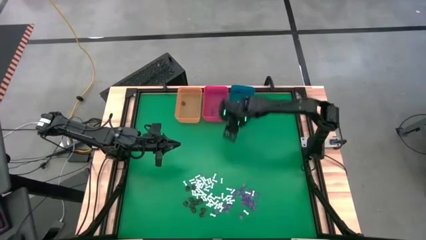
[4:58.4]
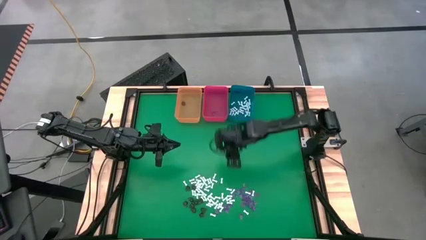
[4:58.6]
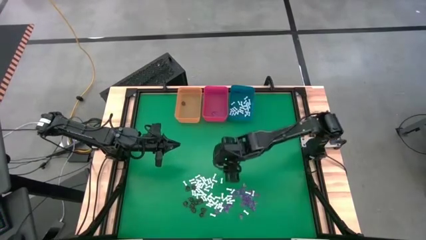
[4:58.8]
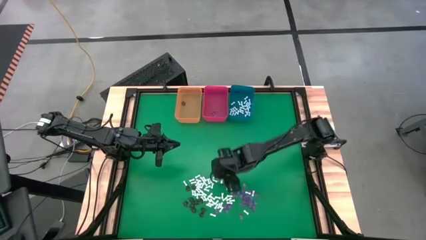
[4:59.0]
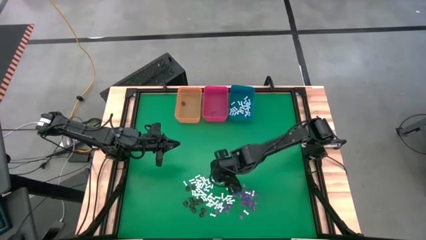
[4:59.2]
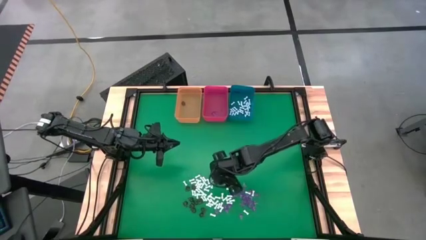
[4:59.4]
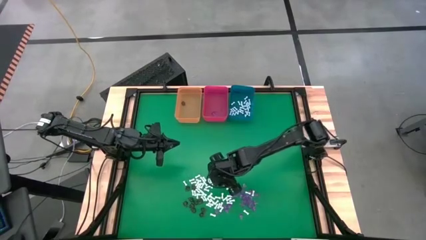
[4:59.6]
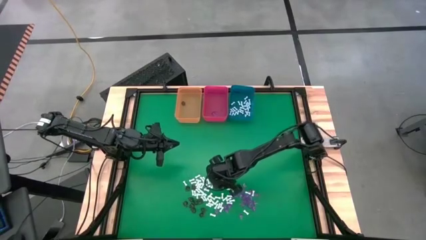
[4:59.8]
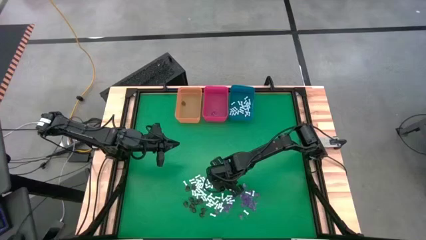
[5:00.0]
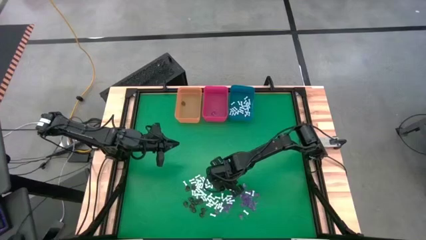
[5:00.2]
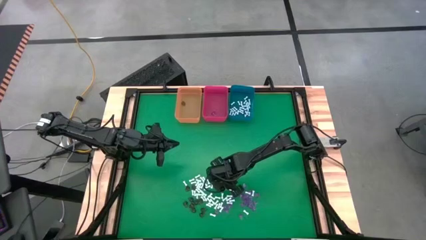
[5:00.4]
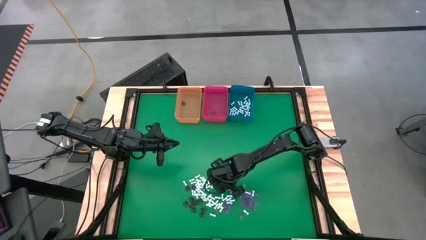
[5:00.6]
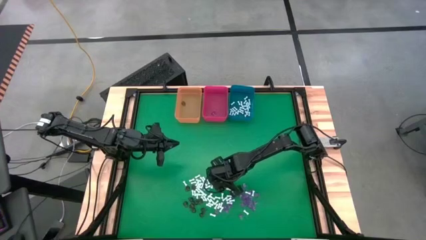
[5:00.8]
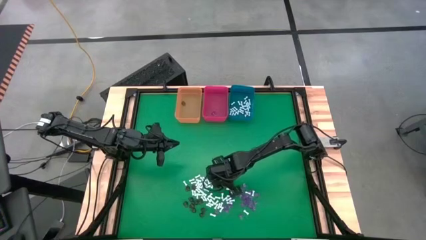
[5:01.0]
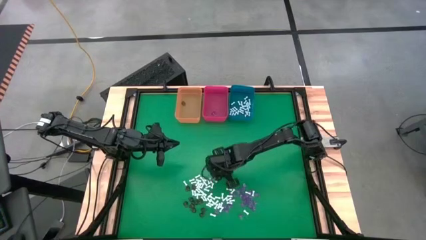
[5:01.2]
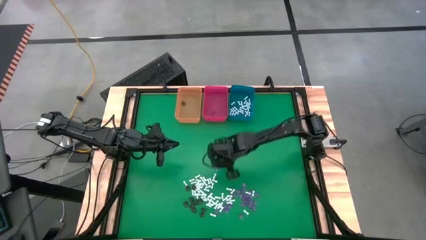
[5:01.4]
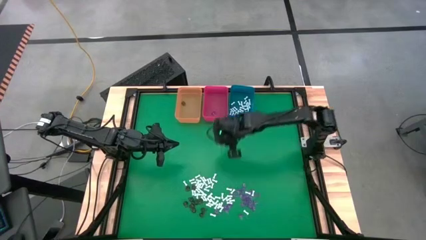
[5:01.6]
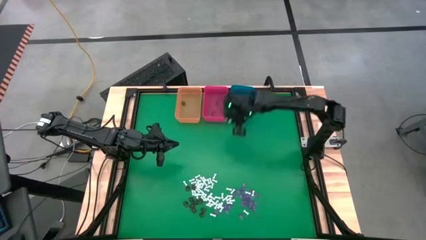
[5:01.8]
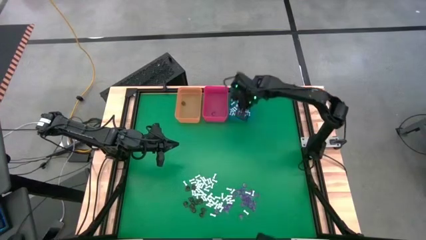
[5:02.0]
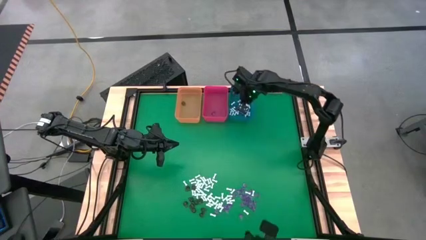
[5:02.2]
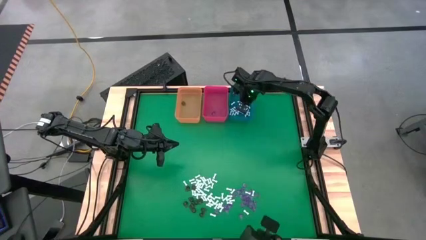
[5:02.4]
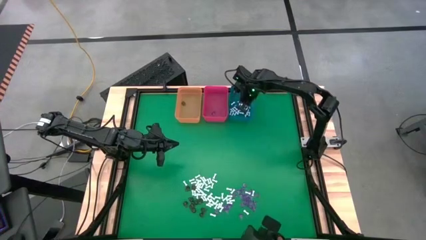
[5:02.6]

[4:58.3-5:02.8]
Task: Sort Halloween decoration
Put the white bone toy into the blue bin

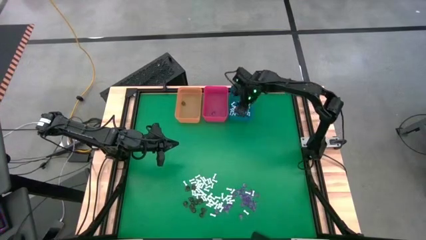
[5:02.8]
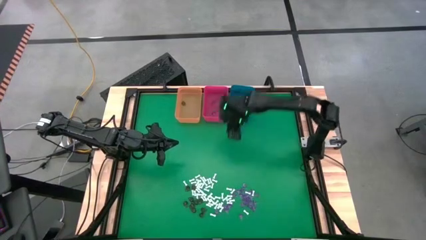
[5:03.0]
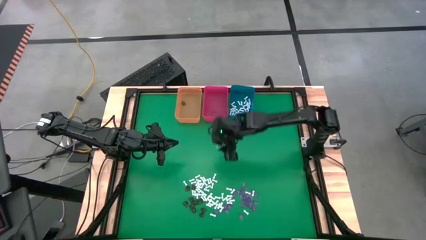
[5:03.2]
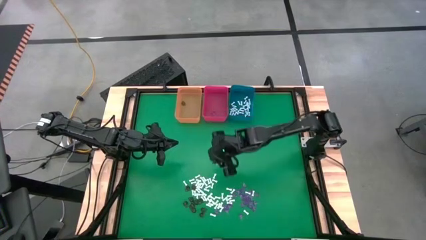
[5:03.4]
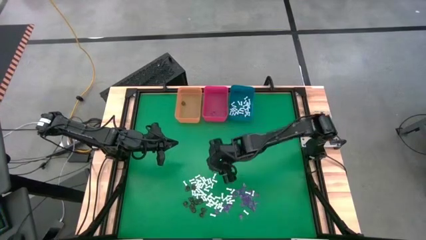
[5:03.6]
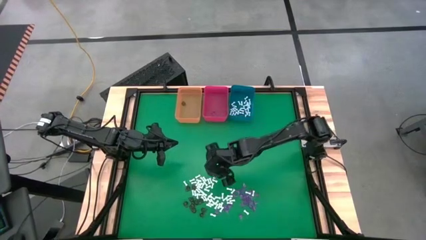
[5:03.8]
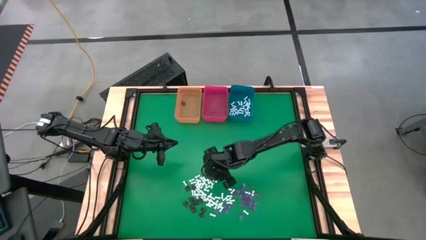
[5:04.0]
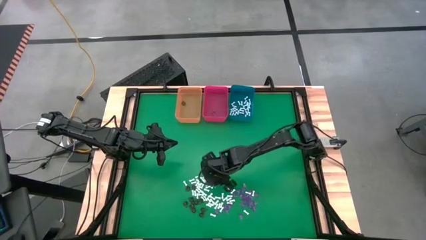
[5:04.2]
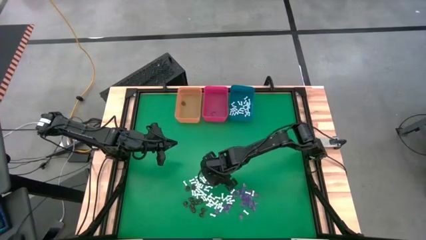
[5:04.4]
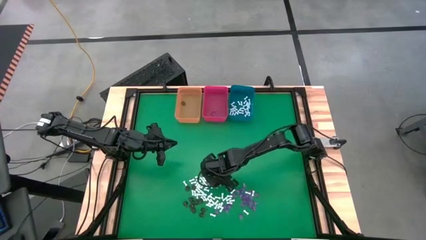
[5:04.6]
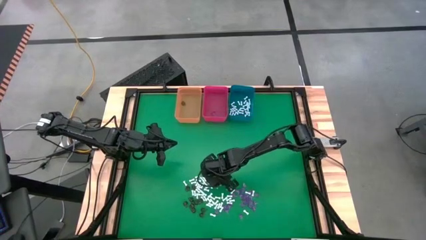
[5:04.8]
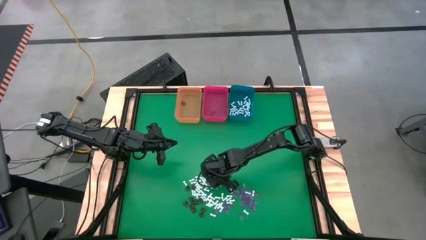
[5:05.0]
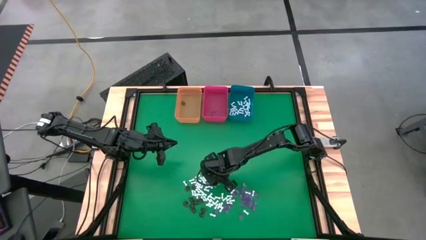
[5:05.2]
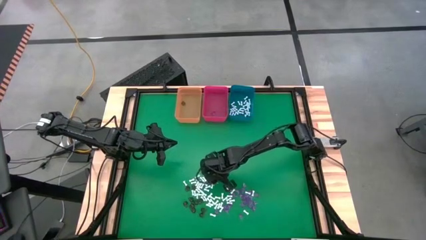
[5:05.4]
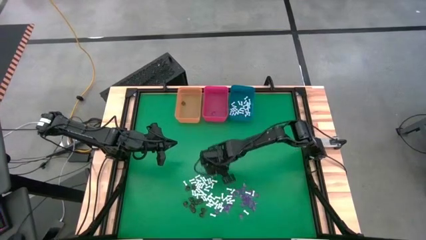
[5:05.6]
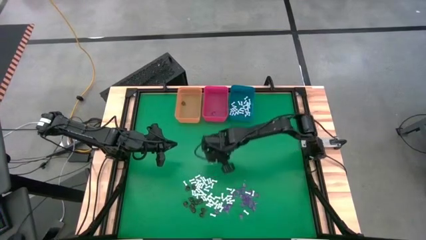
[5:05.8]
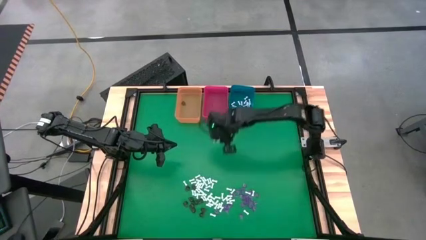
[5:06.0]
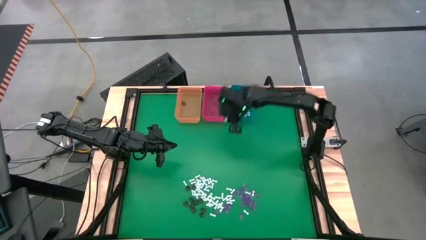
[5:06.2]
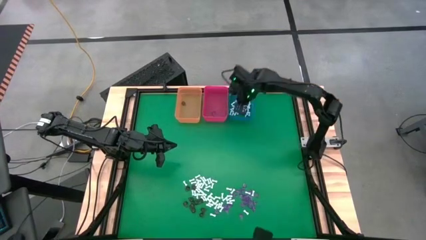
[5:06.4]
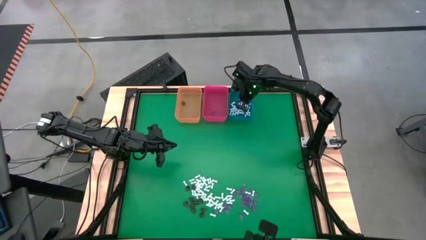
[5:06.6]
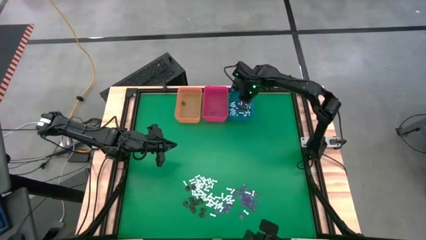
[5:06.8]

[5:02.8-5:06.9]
Put the white bone toy into the blue bin

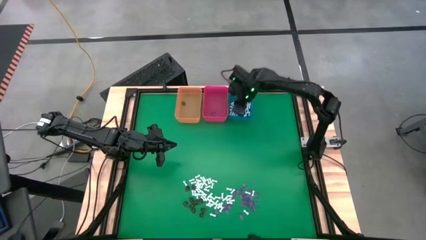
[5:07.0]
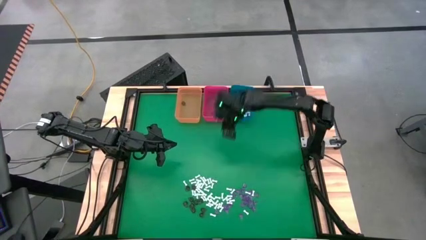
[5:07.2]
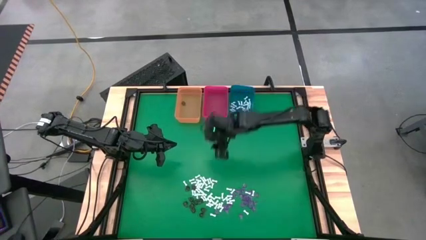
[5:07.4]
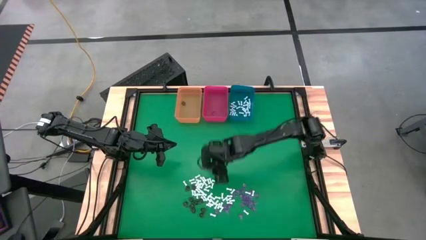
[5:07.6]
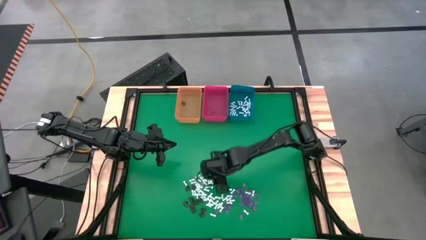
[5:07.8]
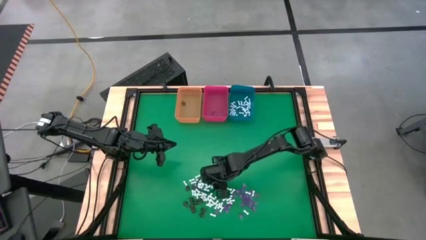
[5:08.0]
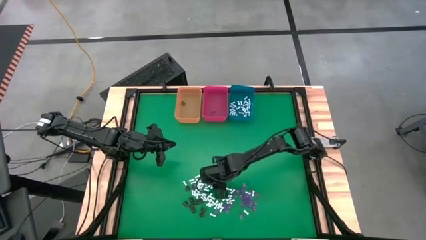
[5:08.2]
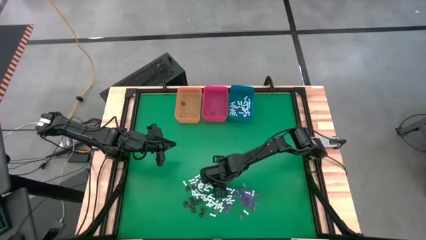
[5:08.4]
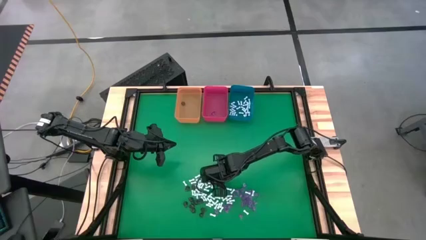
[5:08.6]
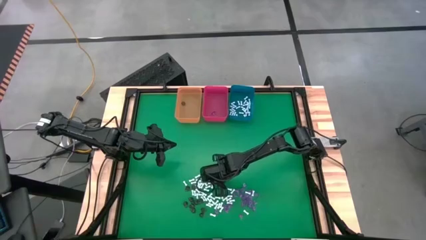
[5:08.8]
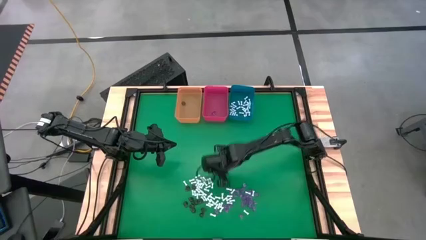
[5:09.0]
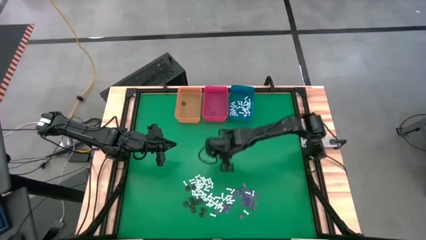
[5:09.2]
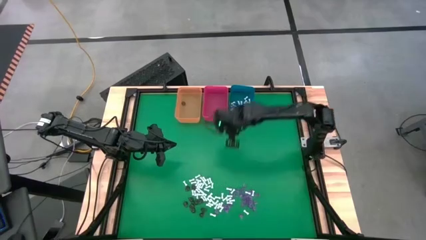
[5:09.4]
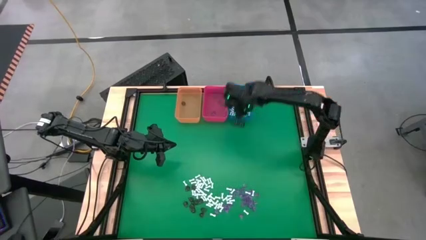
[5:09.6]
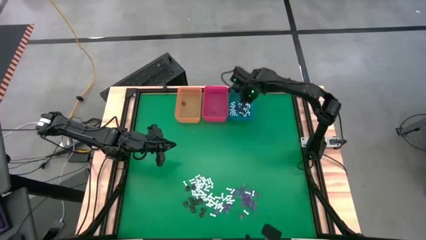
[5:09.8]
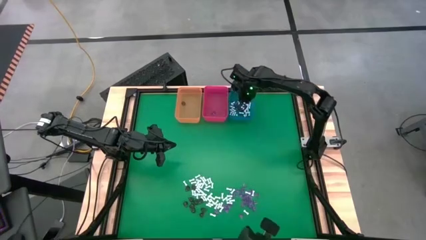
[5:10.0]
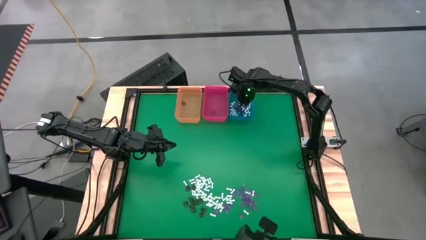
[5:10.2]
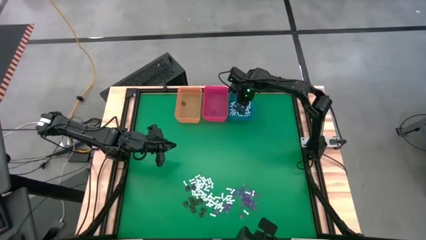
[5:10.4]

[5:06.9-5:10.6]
Put the white bone toy into the blue bin

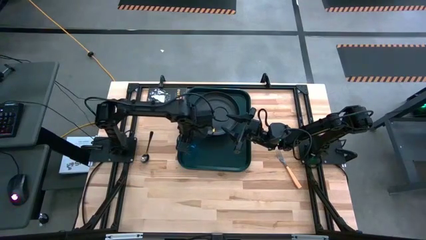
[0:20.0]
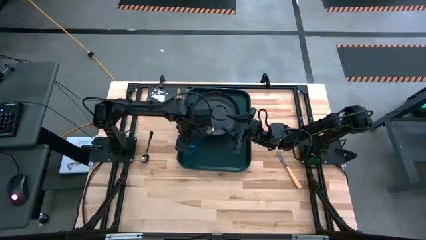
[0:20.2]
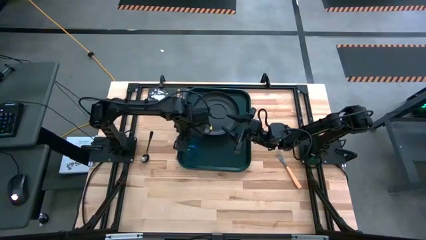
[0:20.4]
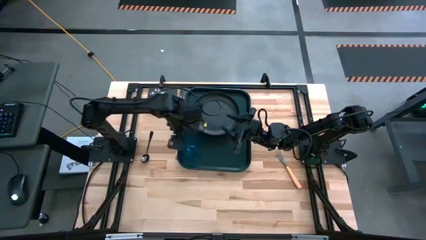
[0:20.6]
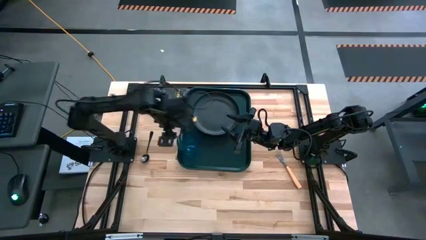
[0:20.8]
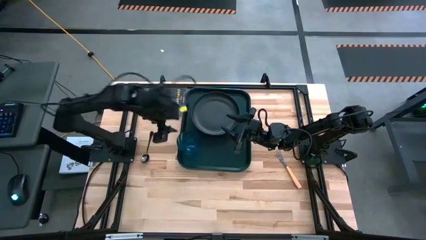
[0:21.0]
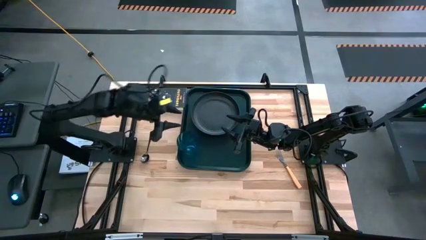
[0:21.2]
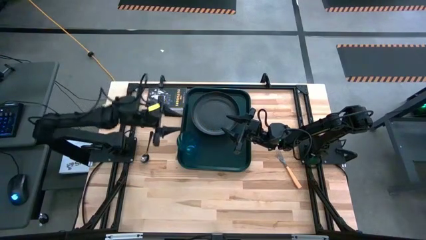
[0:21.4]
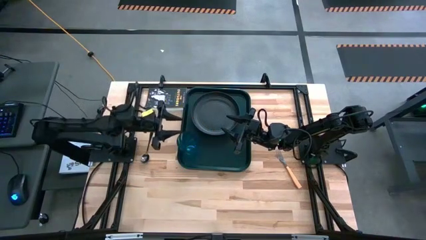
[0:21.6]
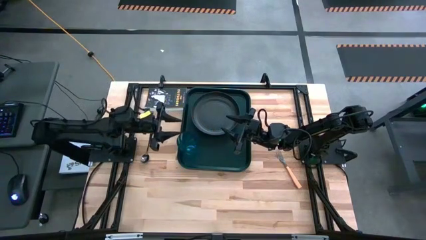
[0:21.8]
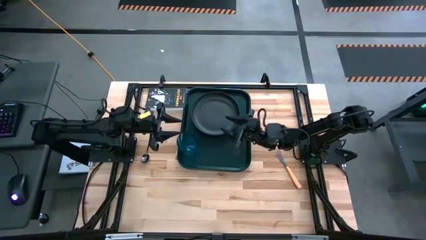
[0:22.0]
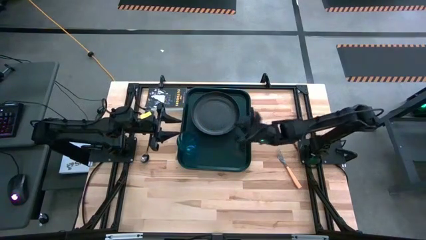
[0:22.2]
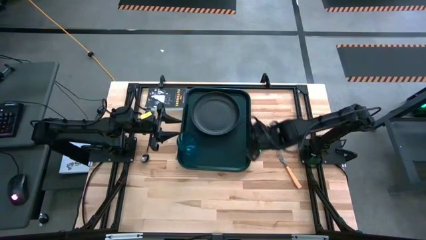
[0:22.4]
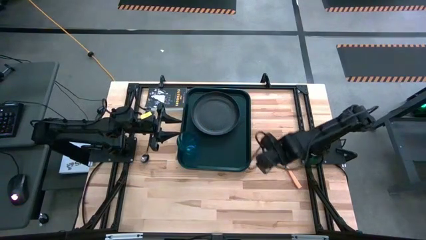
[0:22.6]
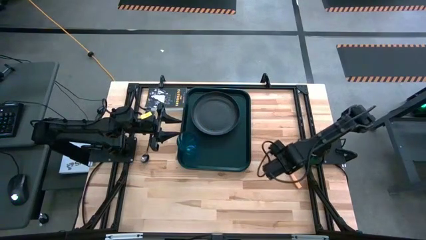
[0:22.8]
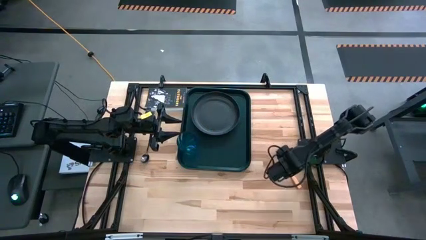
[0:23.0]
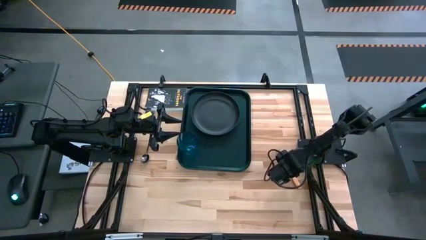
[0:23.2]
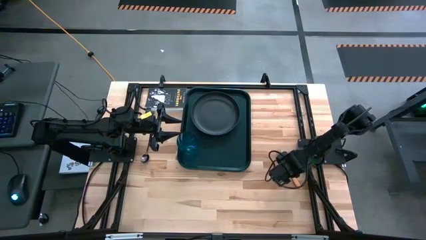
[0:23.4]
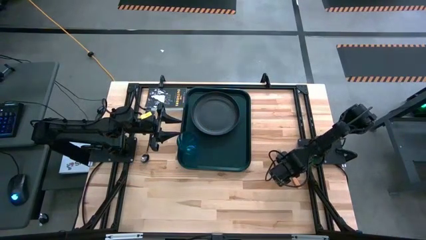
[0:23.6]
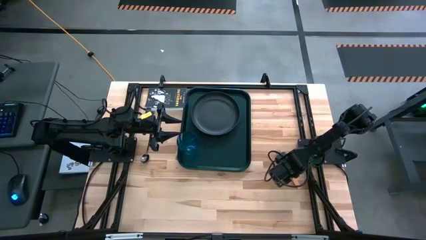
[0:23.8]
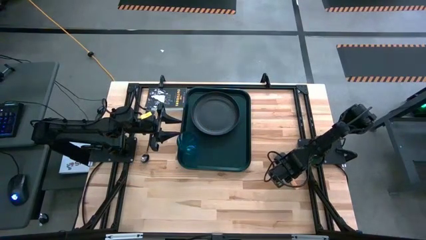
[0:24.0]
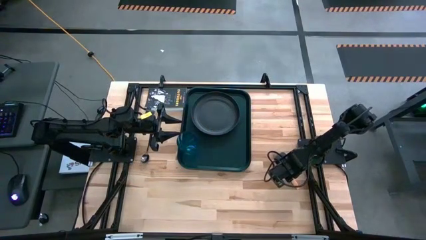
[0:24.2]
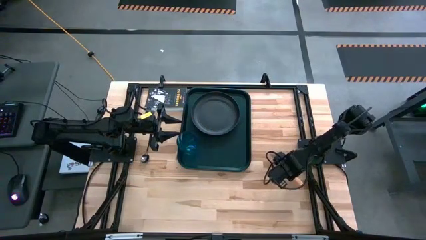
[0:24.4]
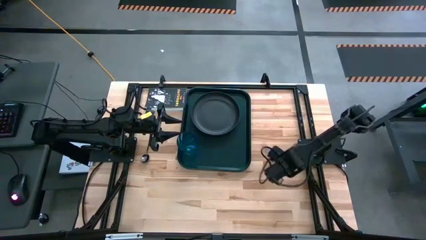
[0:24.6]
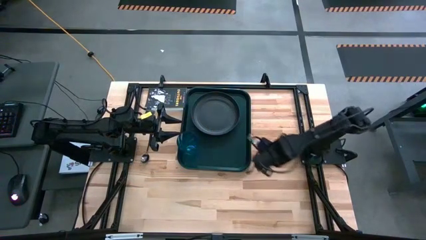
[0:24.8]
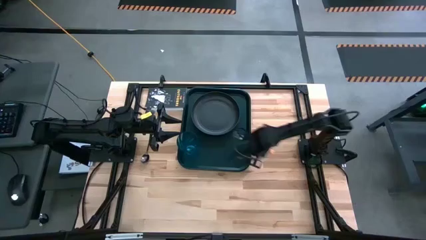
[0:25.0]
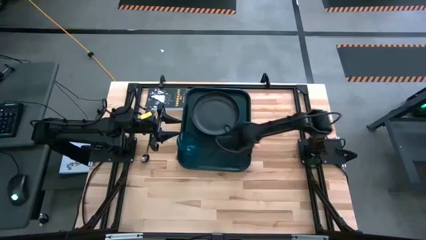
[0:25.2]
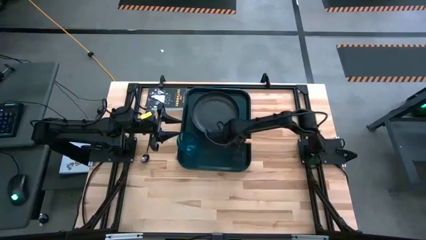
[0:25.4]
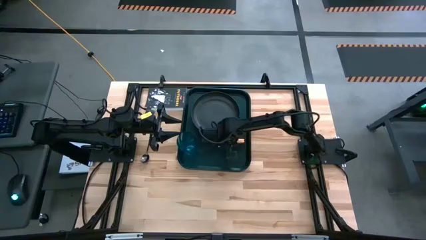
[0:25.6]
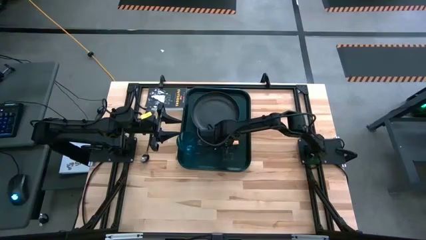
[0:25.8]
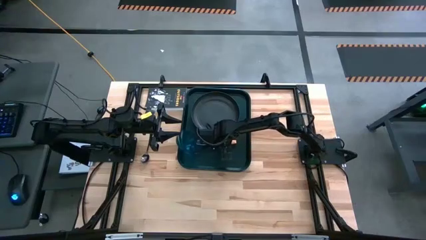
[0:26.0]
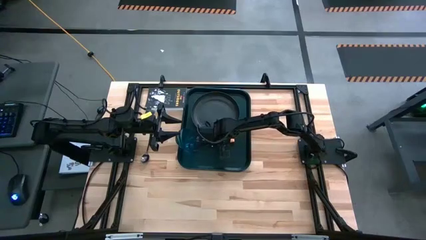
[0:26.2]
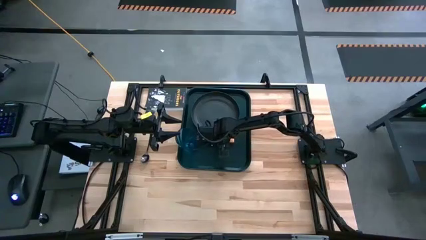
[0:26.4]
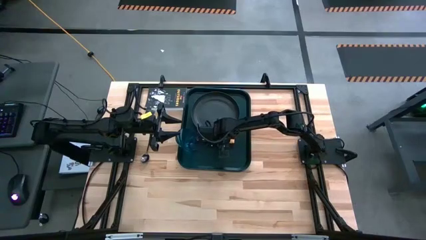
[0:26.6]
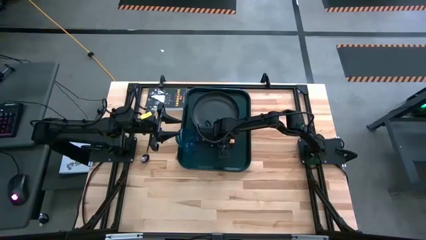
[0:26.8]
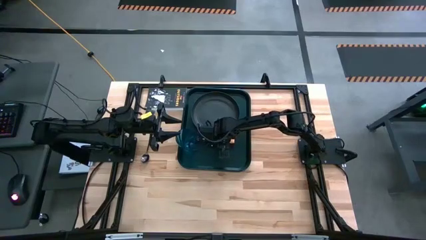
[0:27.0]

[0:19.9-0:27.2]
Task: Pick and place plate/cup/fork/spoon on tray
Put the orange fork on the left side of the black plate on the black serving tray
